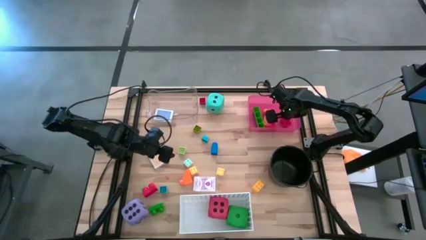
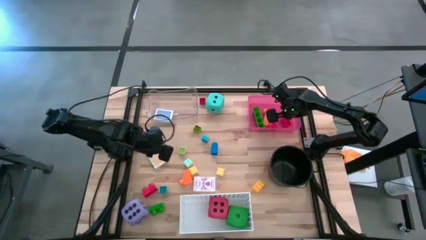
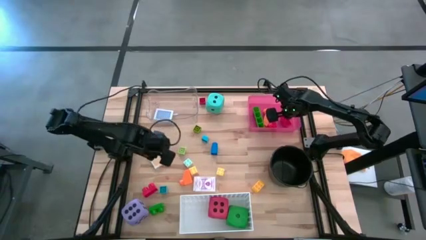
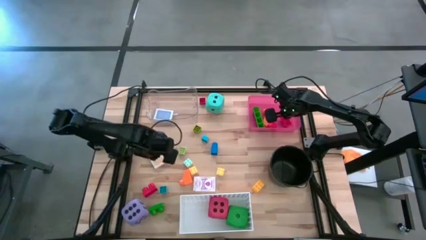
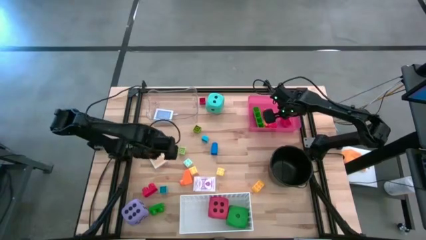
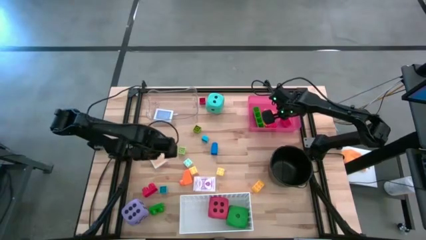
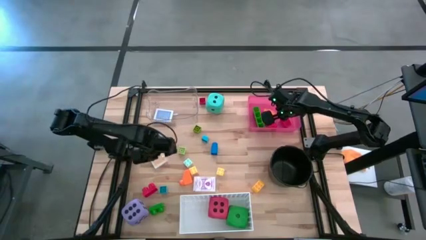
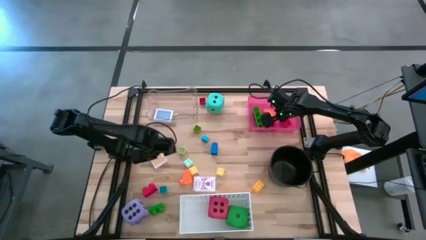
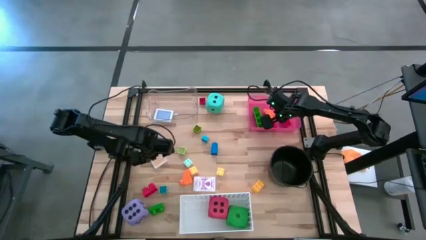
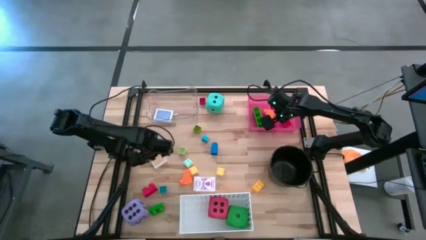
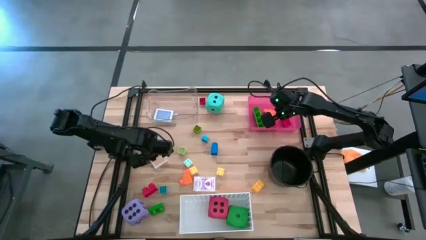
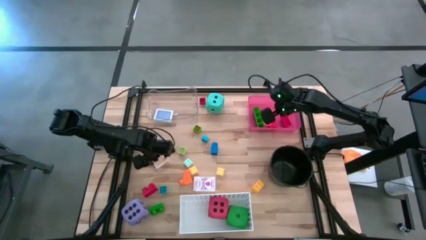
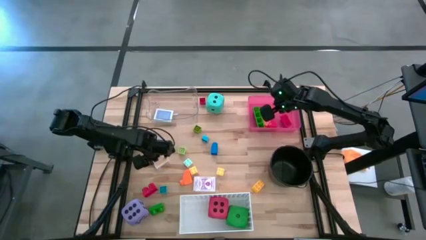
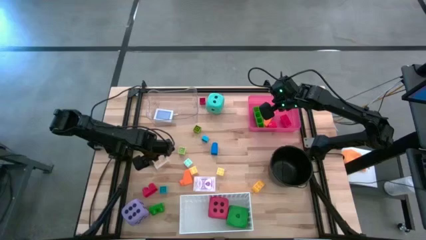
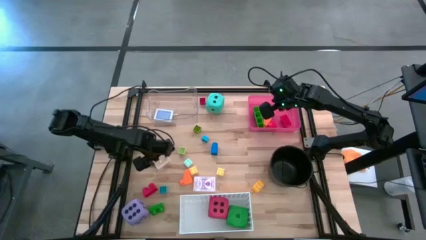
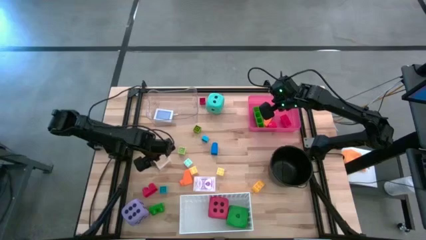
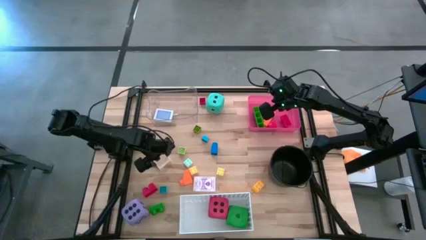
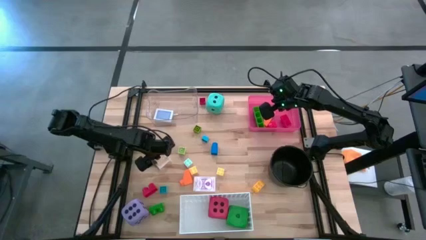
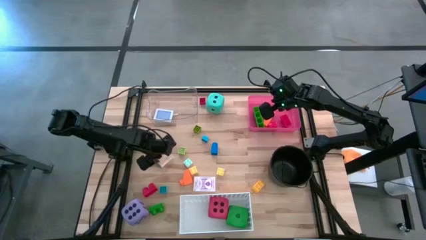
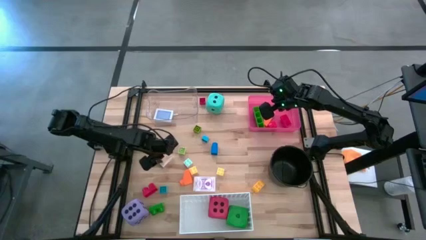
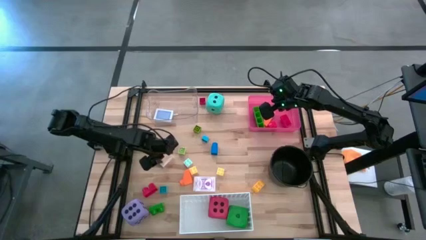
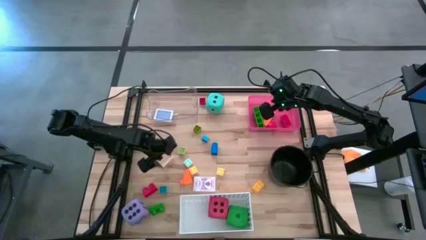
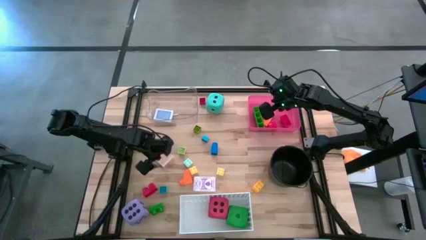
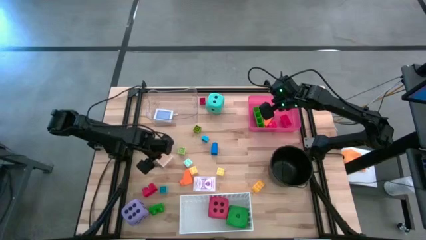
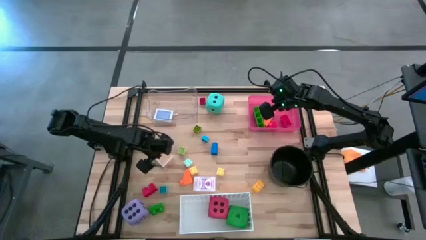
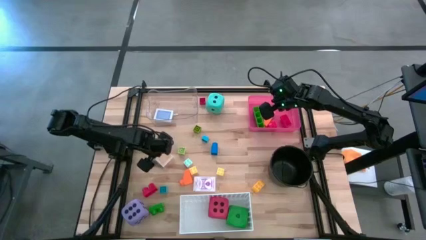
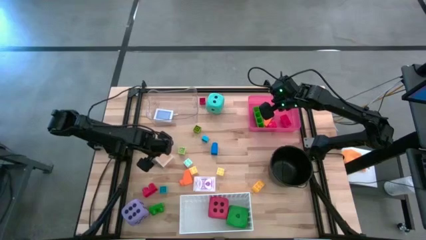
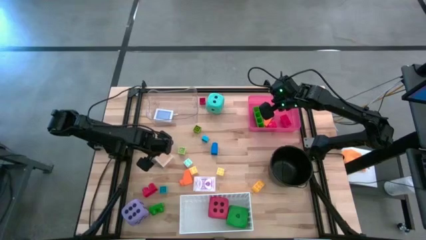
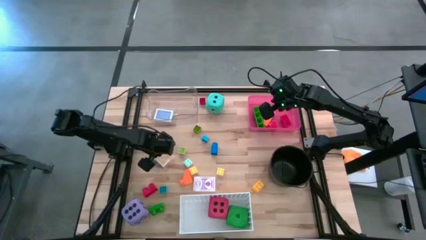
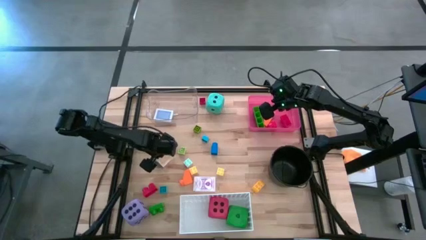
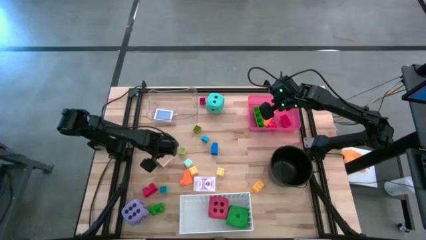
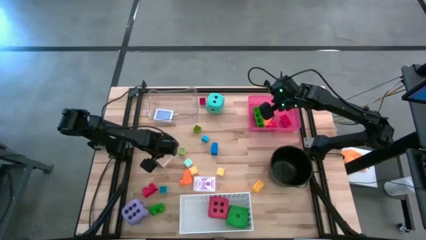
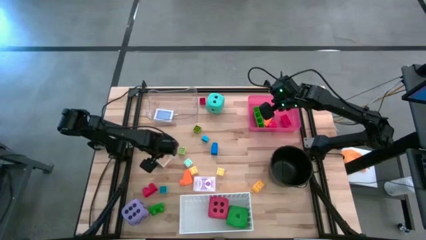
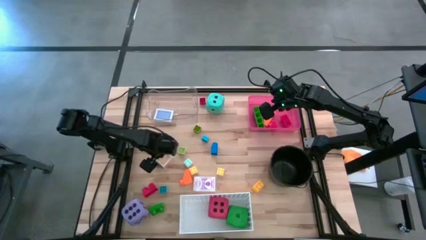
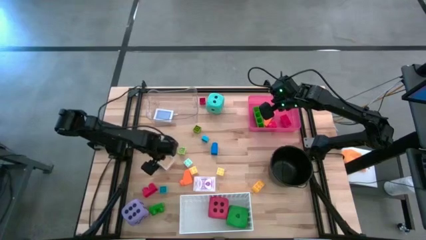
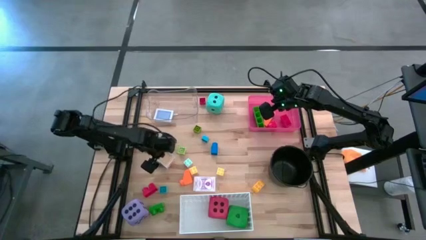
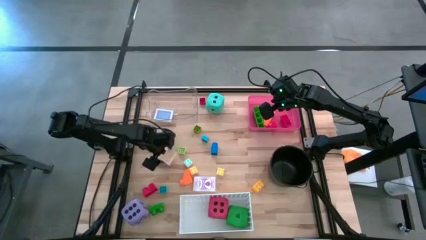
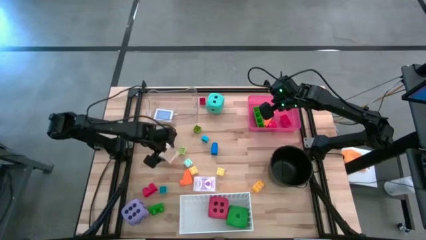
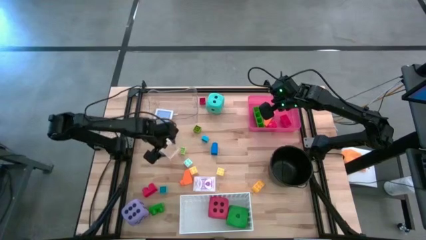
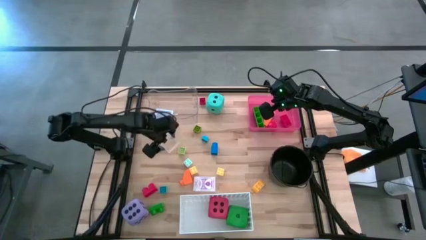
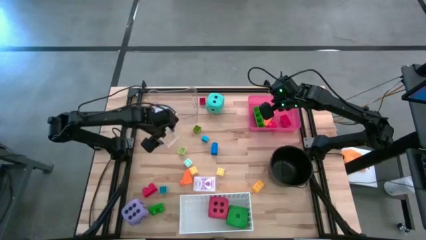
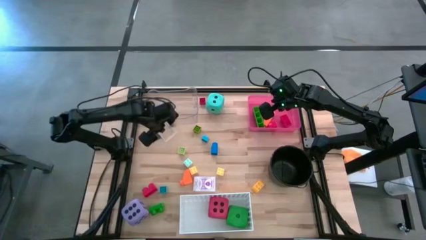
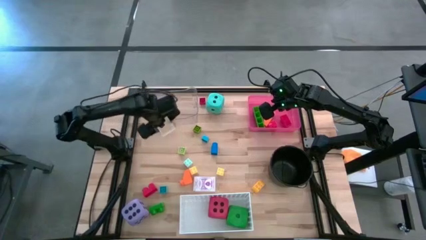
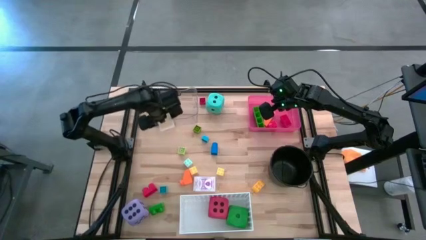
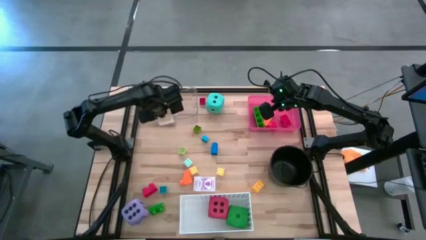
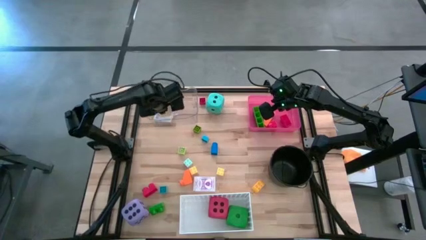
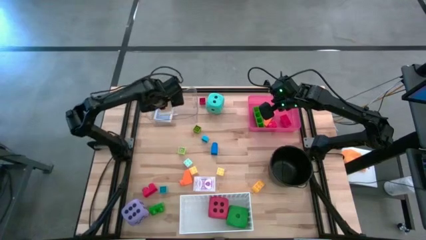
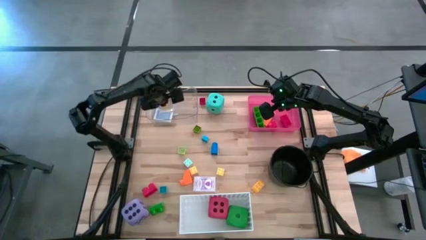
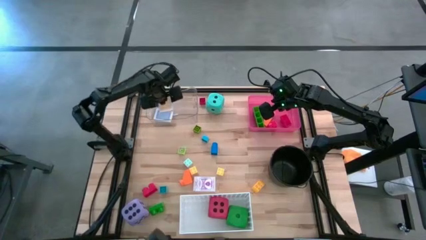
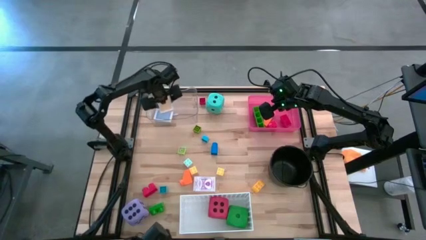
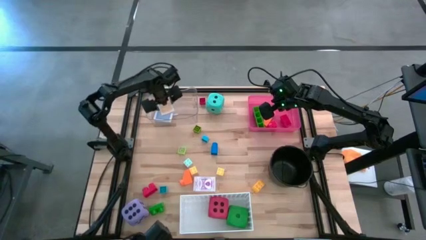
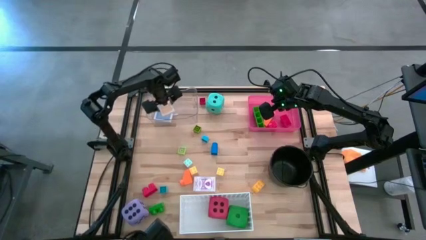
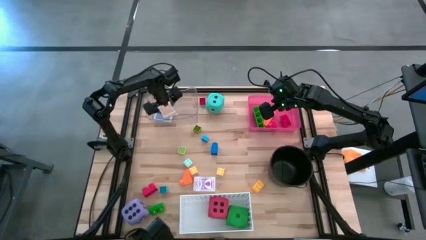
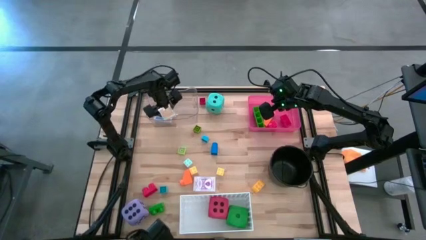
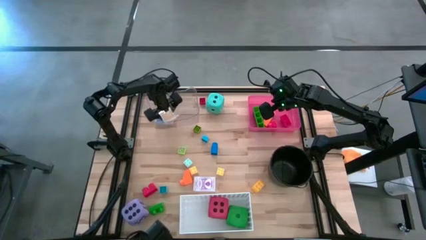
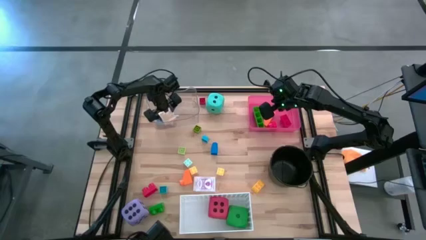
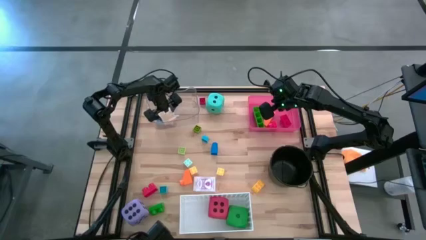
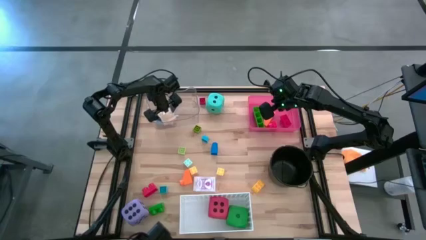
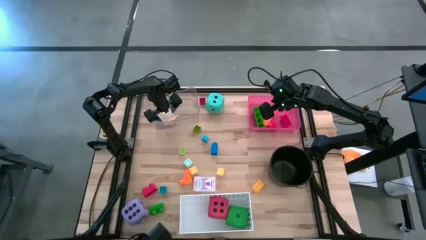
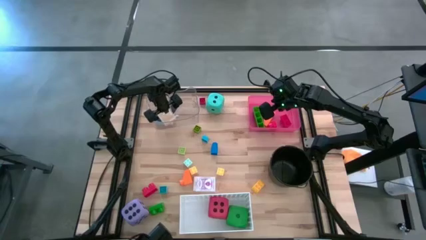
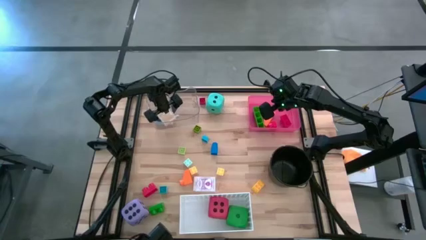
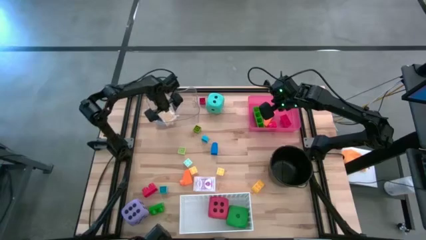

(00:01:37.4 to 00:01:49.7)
Task: Pick & Place Toys
Put the yellow deck of cards into the transparent bin

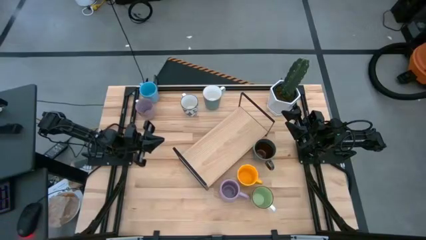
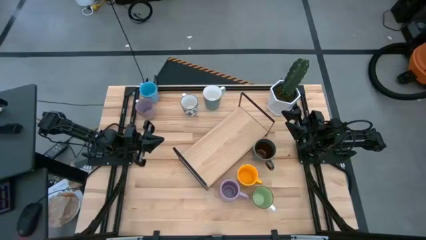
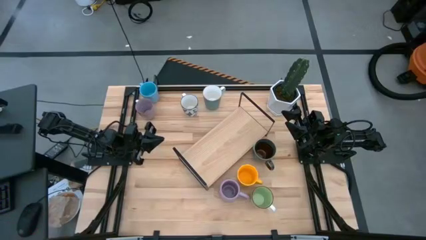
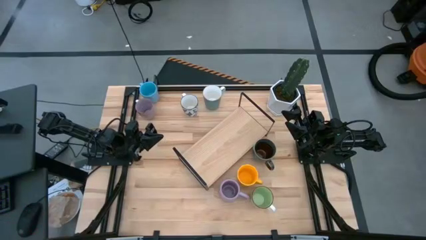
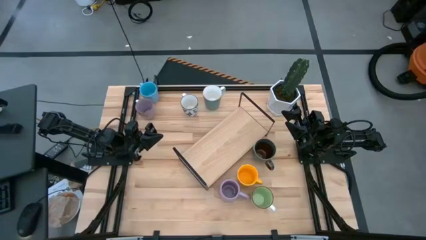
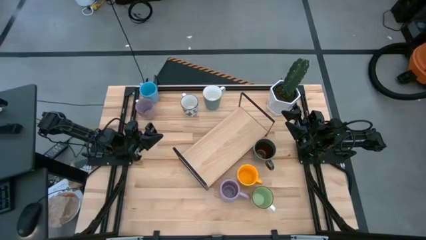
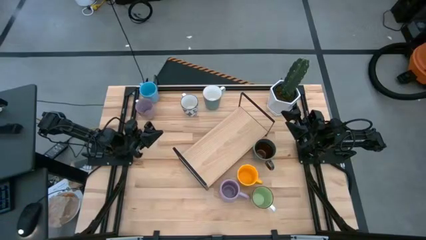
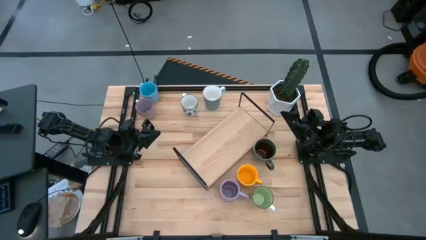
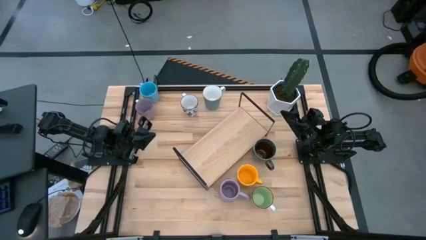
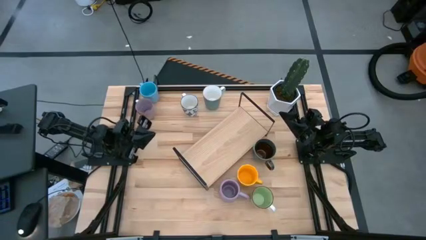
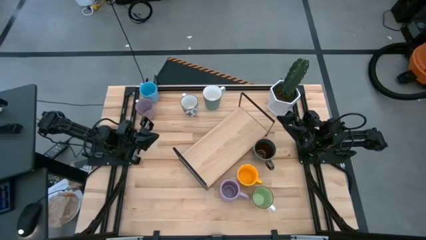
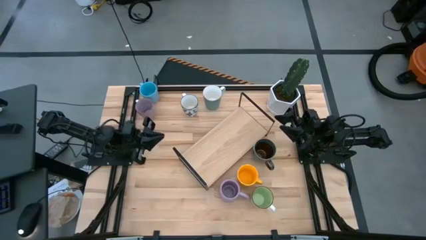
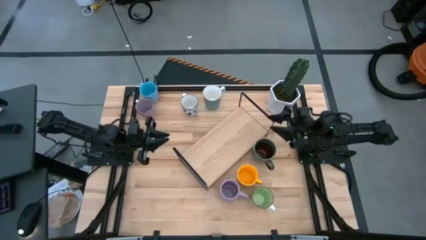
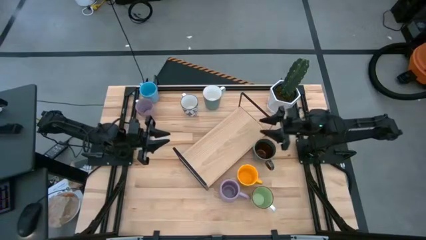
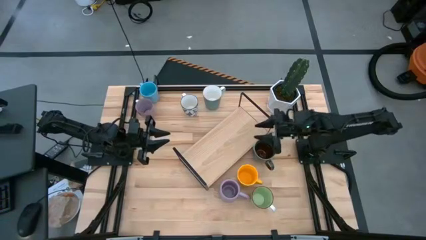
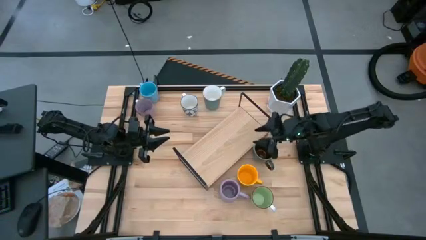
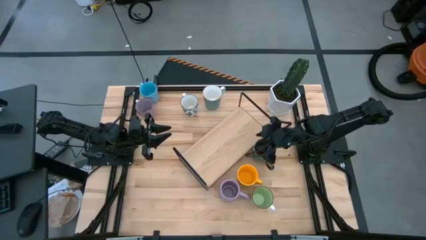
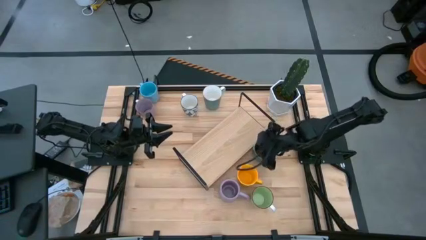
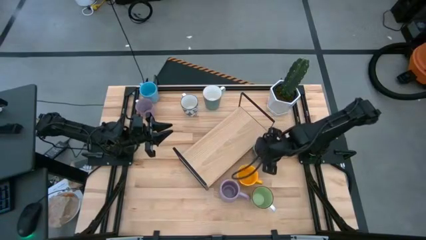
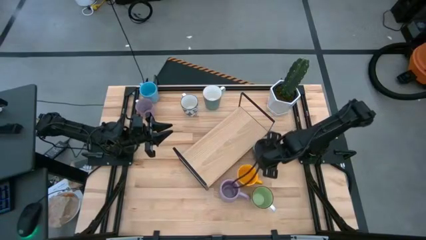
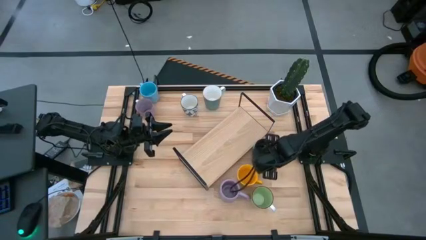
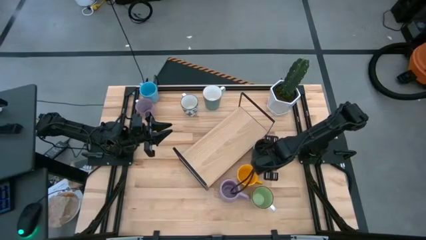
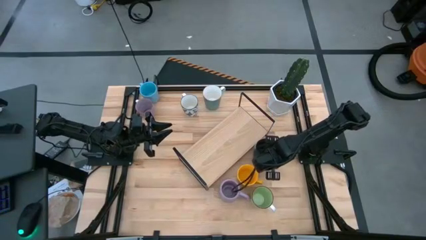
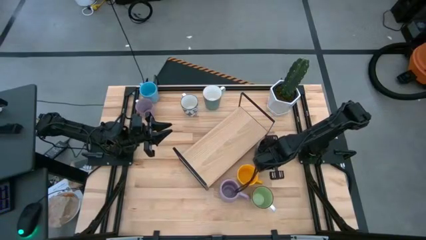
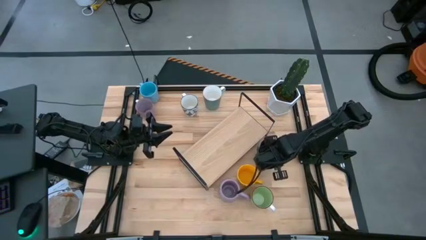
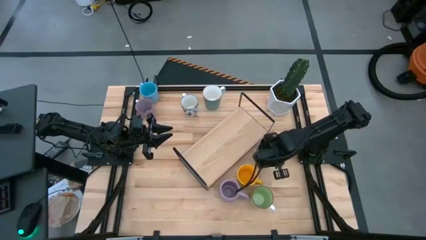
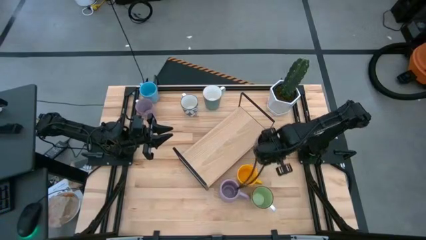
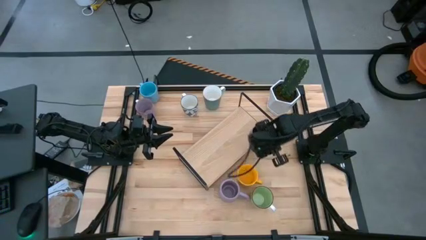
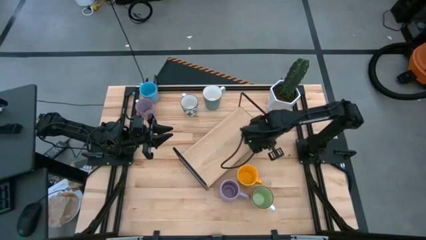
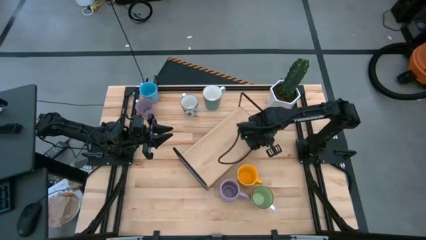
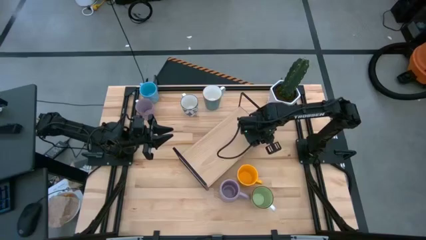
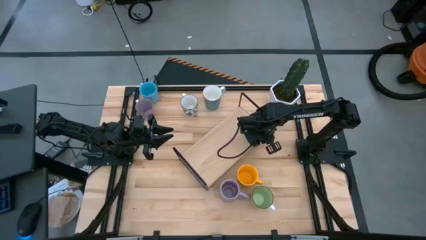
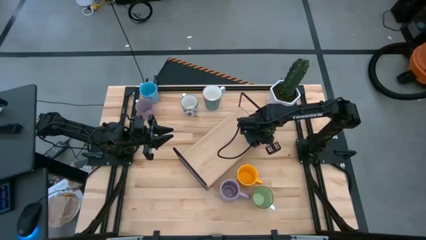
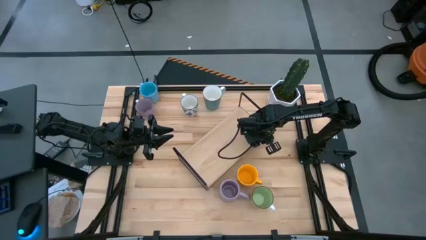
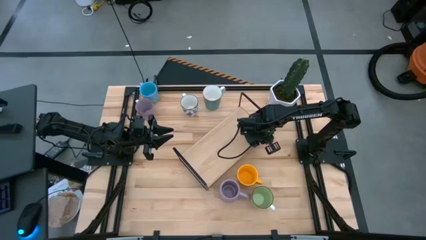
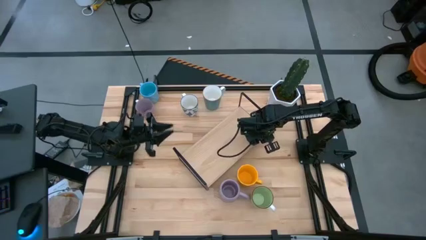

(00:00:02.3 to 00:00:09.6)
Task: Place coffee mugs
Put the bottom blue patterned mug on the shelf
